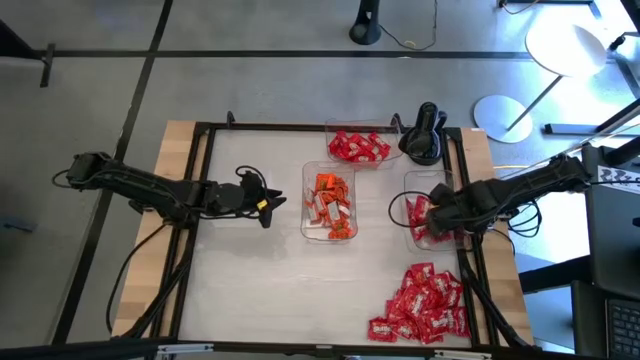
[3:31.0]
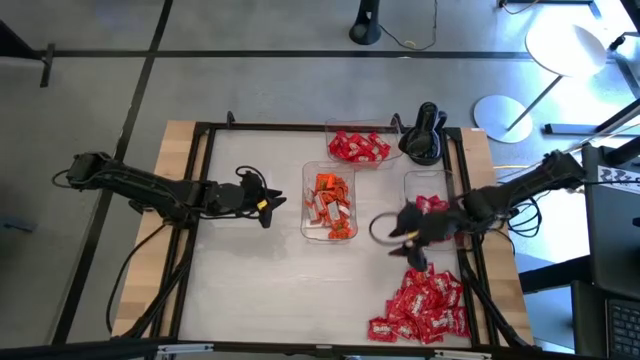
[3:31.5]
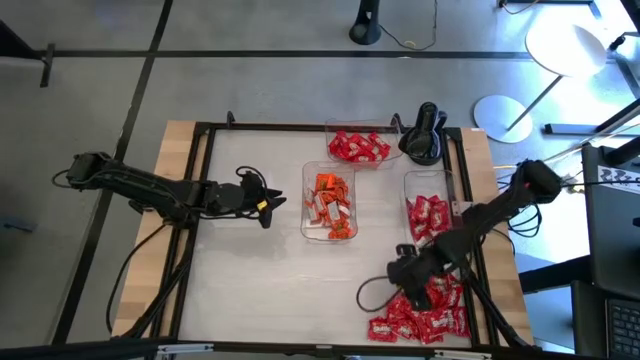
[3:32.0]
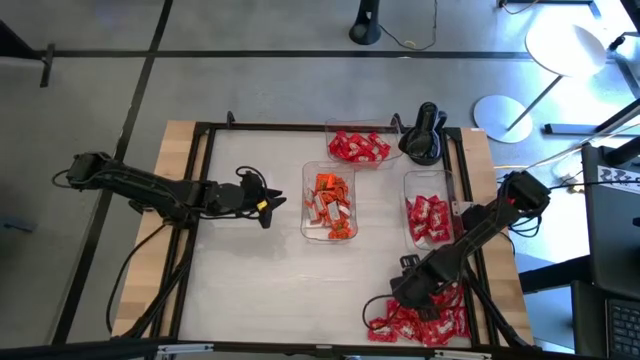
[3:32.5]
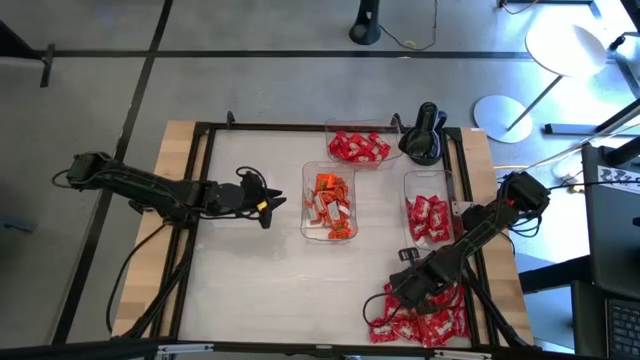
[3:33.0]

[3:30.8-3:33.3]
Task: Sort candy
Put the red candy pack into the bottom right transparent bin

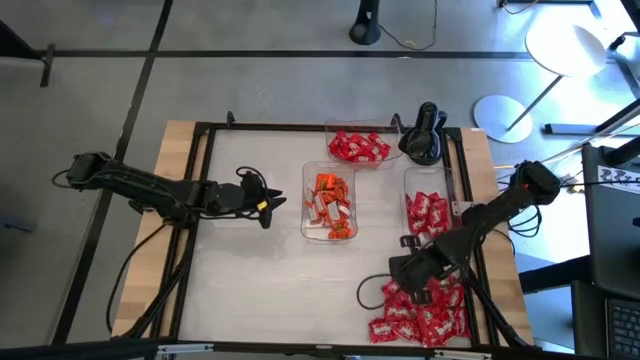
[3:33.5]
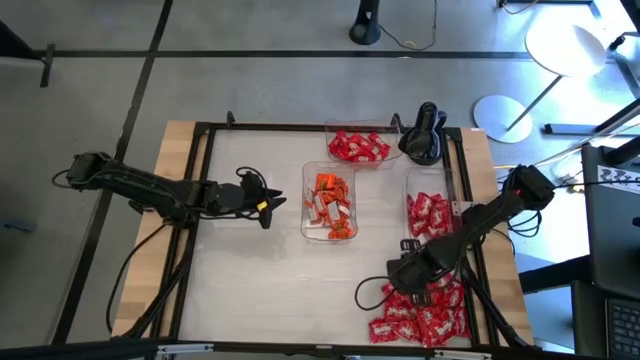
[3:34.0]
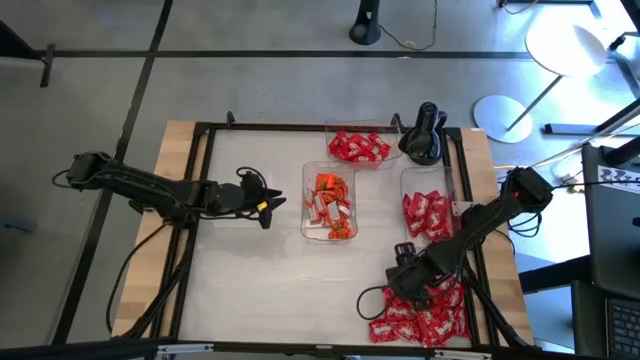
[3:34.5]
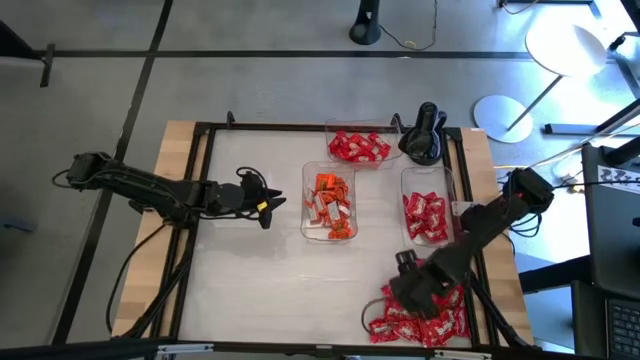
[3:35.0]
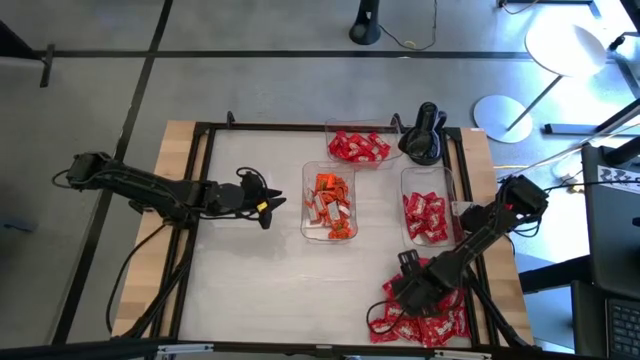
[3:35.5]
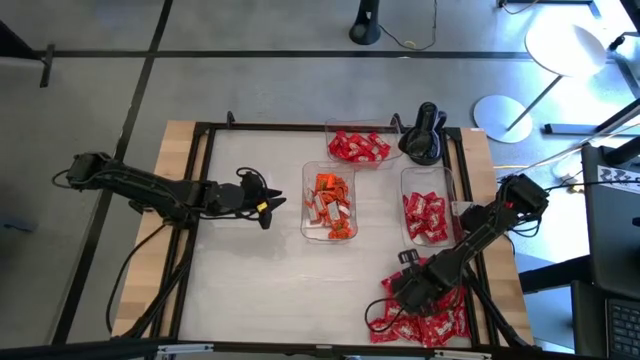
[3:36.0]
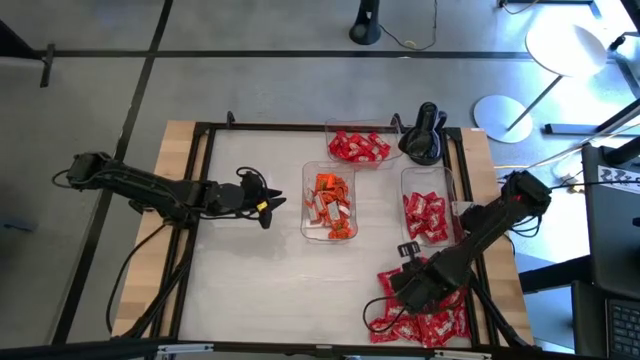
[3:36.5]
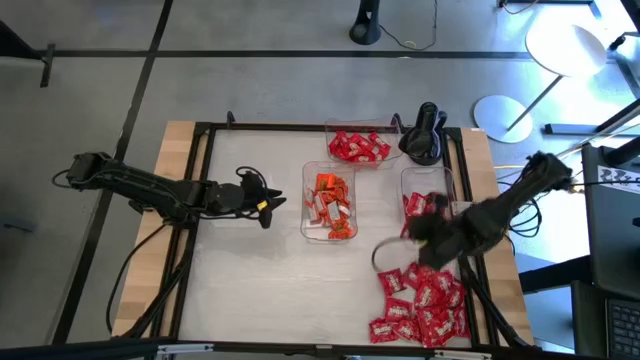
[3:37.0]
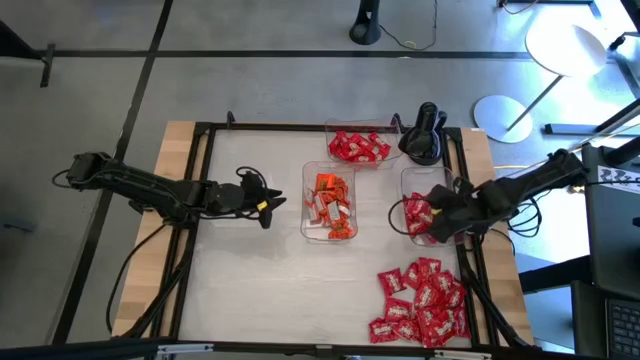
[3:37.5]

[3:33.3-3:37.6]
Put the red candy pack into the bottom right transparent bin

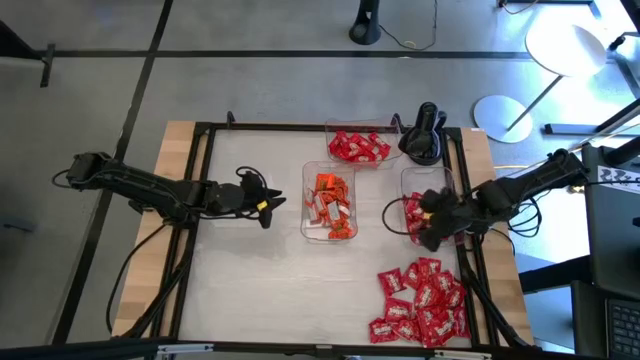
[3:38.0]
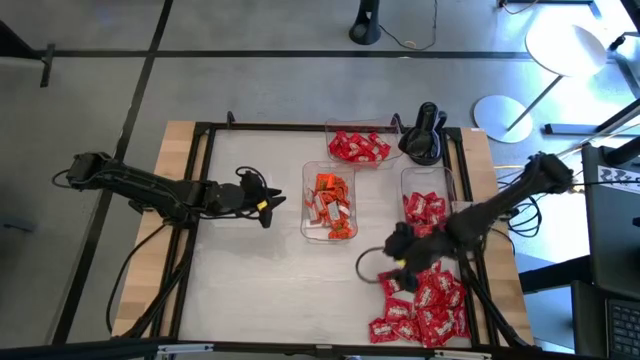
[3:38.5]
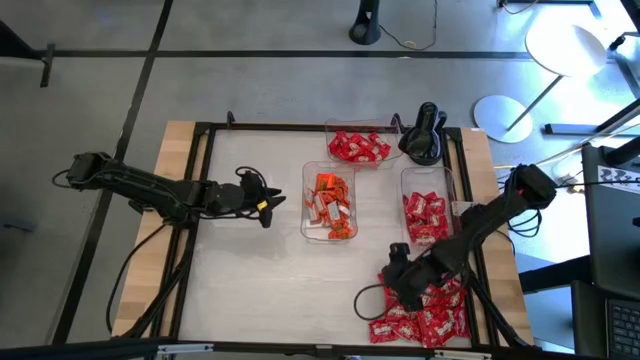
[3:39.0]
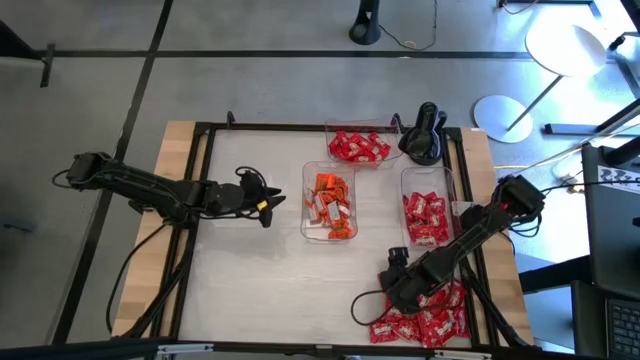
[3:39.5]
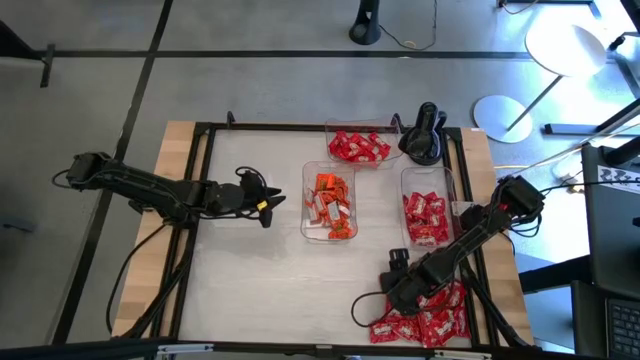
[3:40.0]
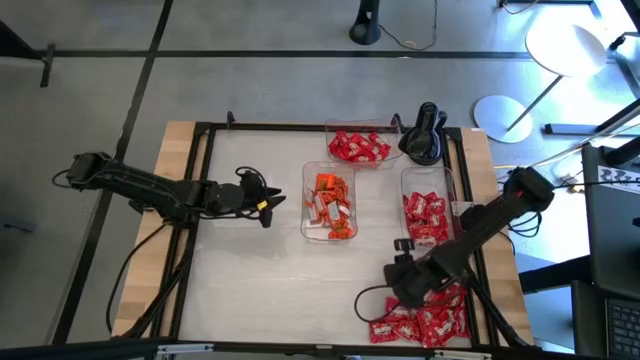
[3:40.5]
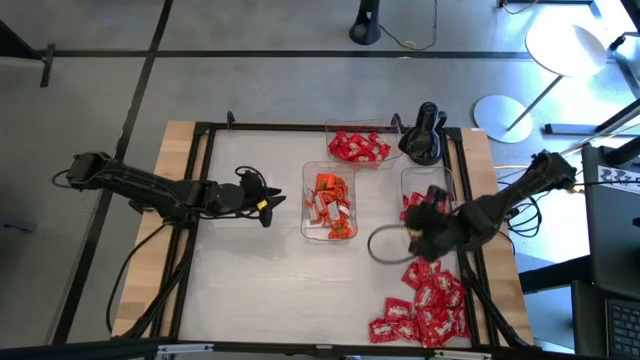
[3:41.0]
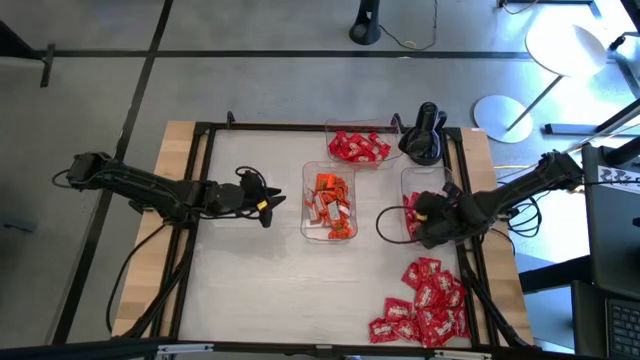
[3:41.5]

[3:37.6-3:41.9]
Put the red candy pack into the bottom right transparent bin

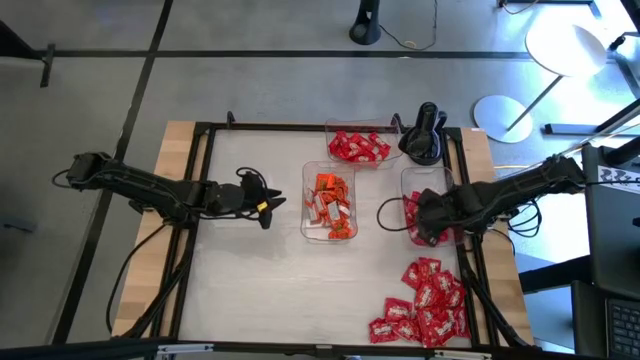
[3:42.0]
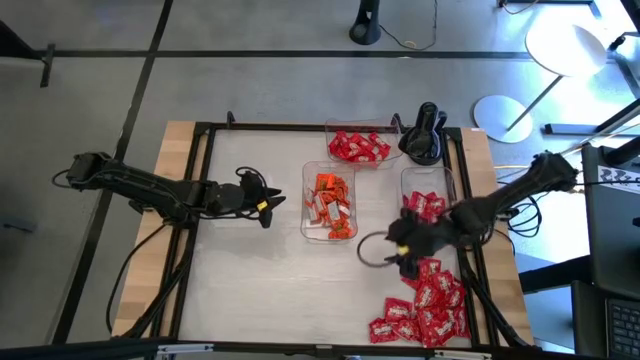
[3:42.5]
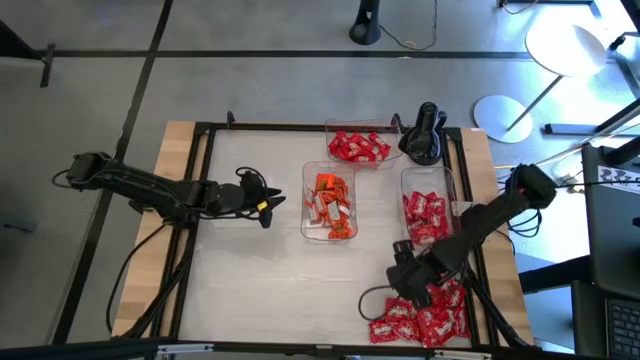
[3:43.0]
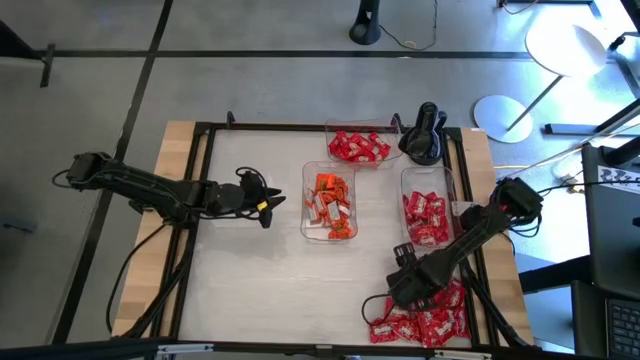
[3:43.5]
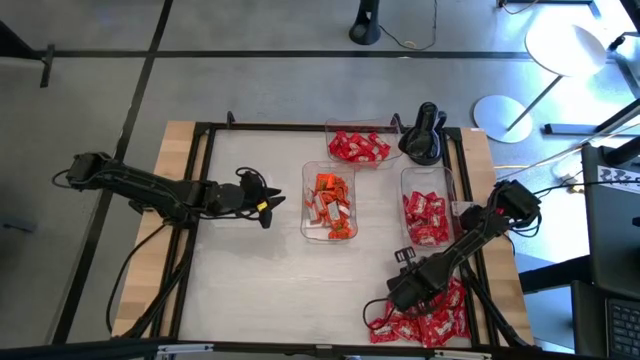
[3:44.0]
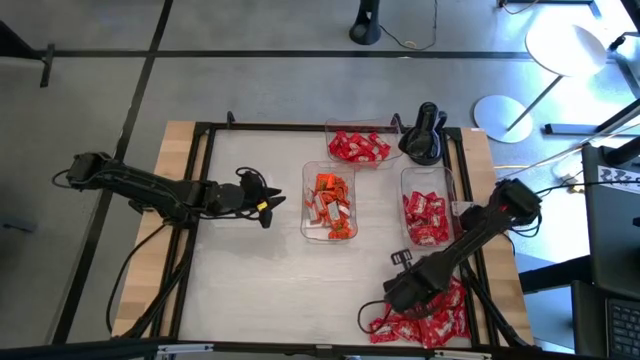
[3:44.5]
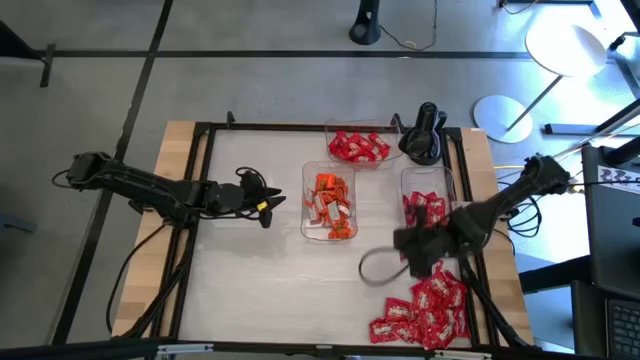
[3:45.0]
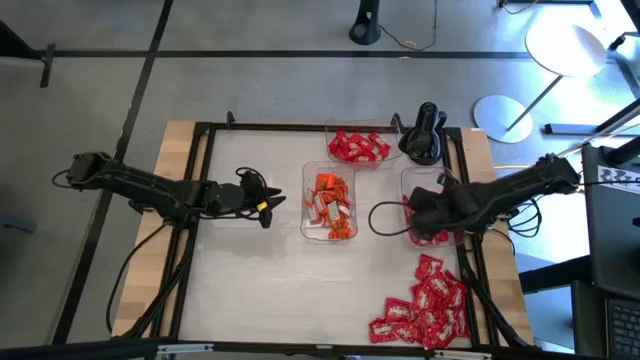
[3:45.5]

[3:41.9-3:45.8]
Put the red candy pack into the bottom right transparent bin

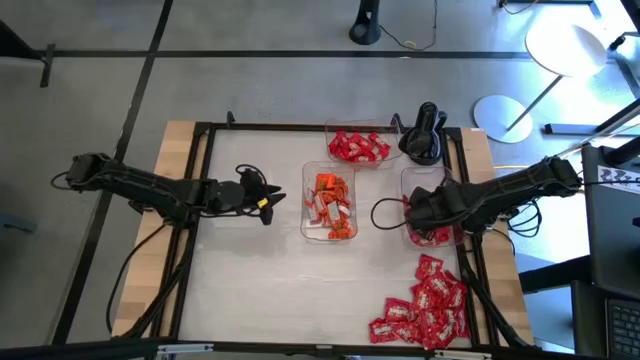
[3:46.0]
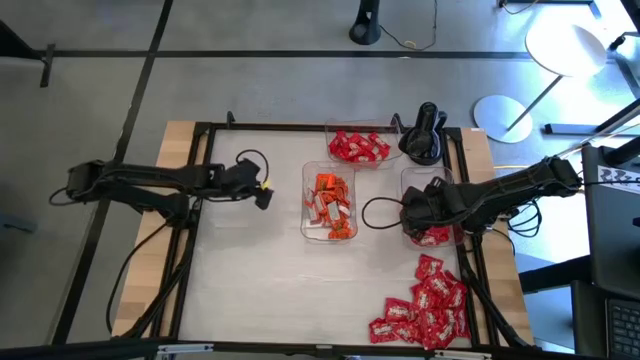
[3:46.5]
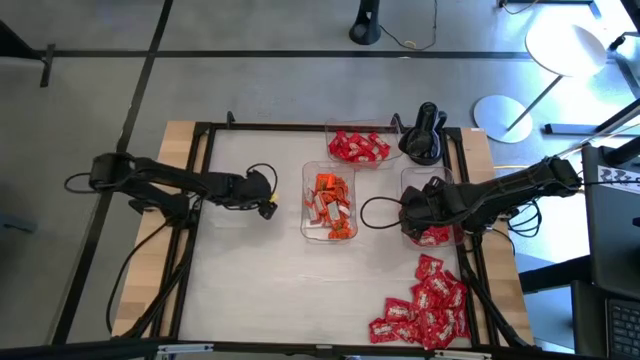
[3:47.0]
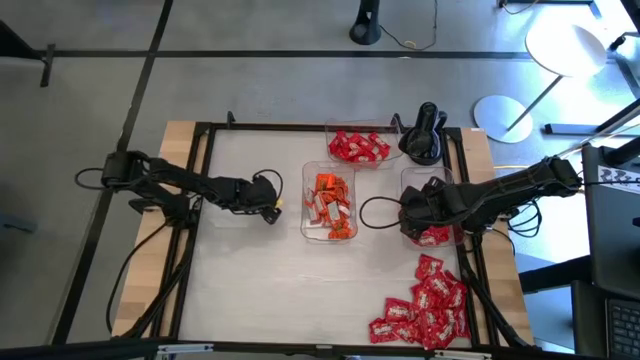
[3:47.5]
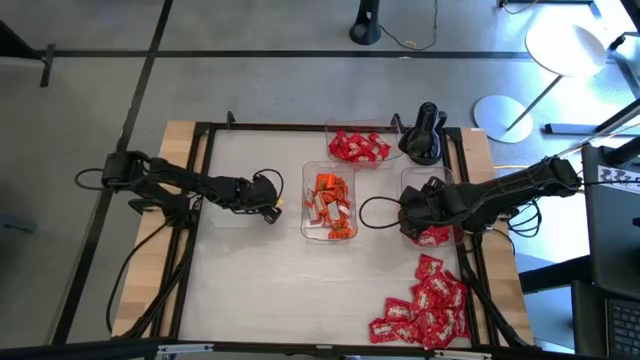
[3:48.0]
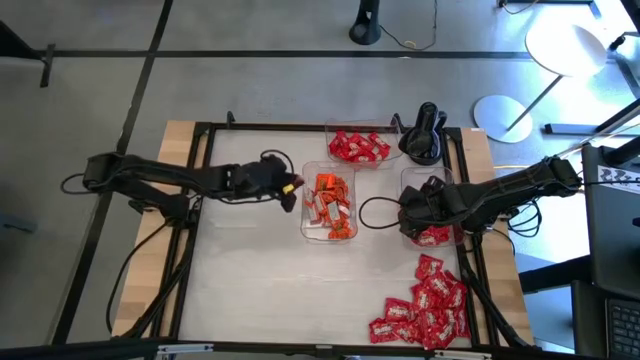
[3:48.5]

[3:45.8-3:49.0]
Put the orange candy into the bottom left transparent bin

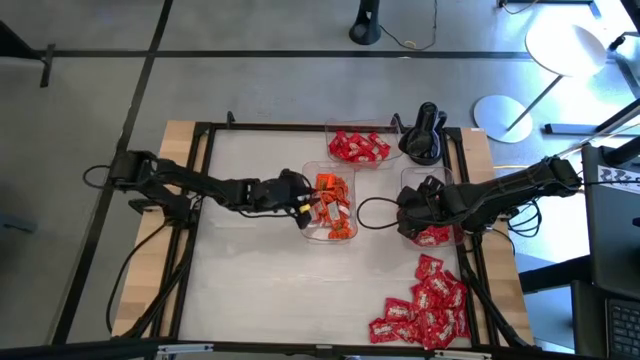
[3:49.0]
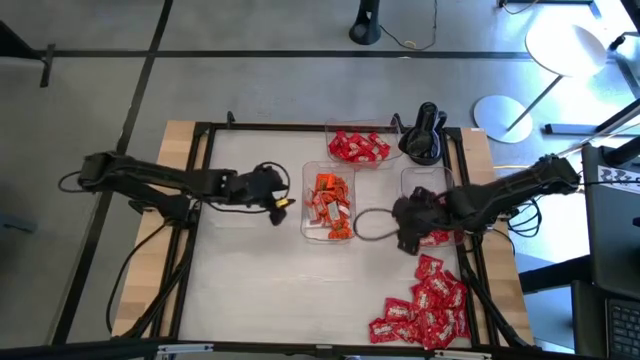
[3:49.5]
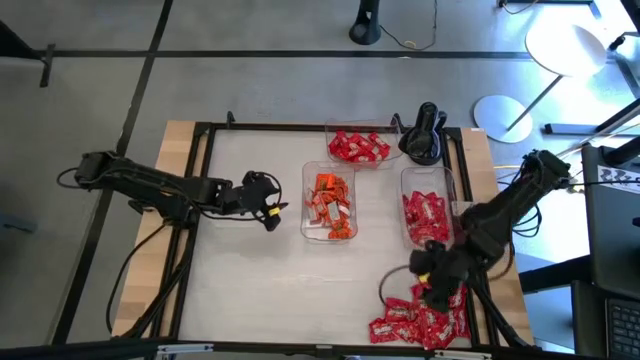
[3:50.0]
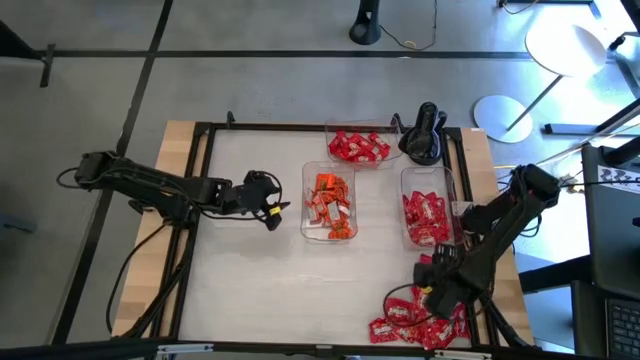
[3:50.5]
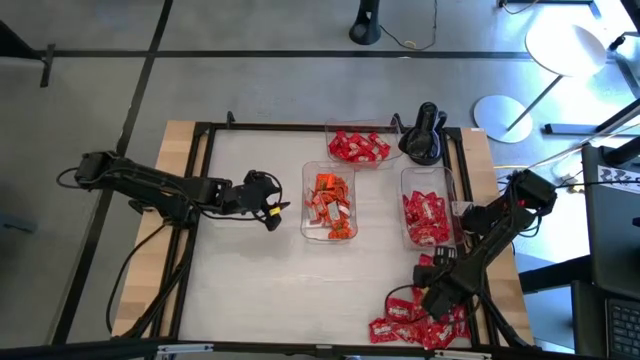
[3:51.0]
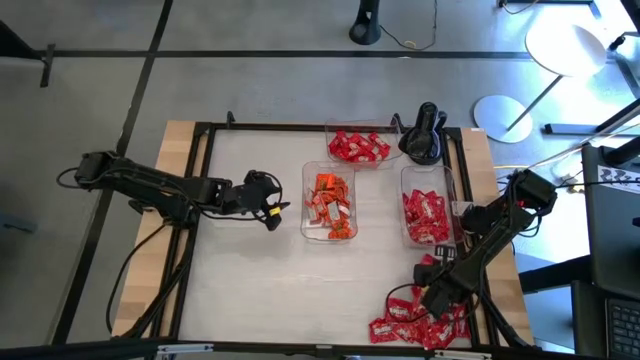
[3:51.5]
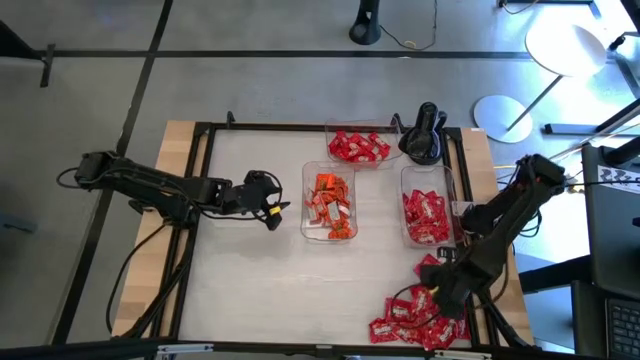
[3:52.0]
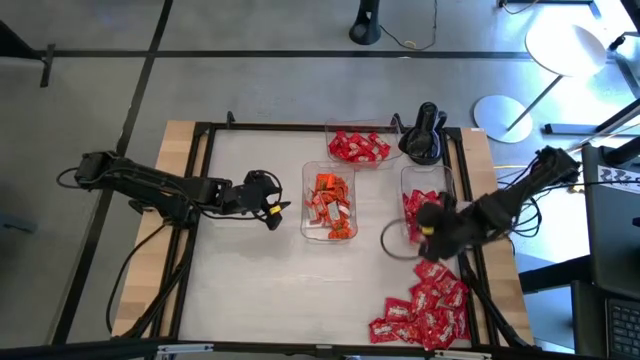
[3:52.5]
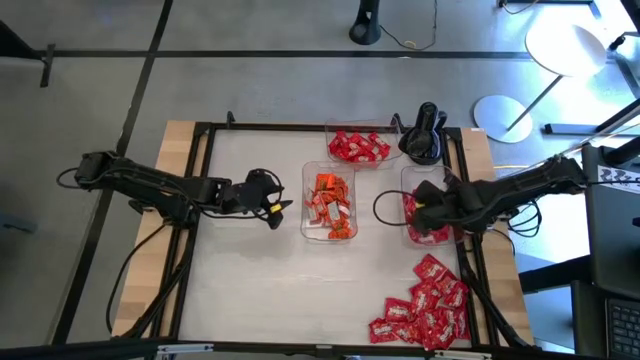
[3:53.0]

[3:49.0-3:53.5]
Put the red candy pack into the bottom right transparent bin
